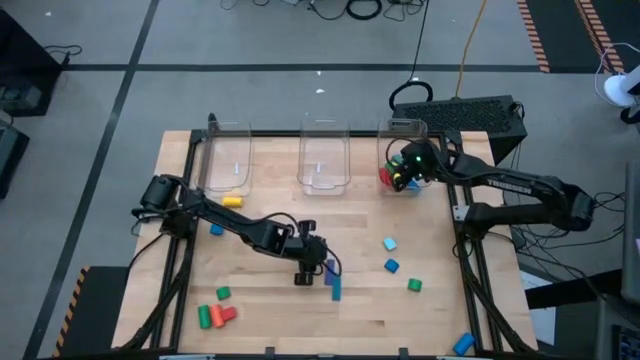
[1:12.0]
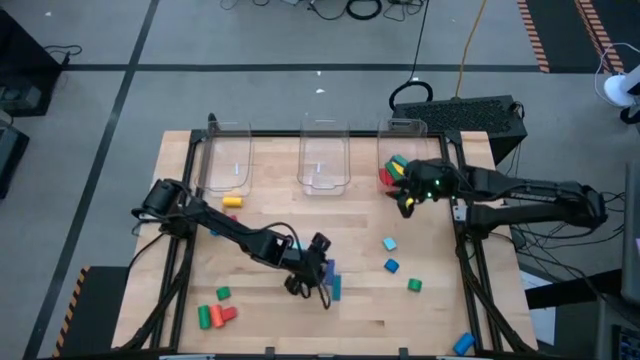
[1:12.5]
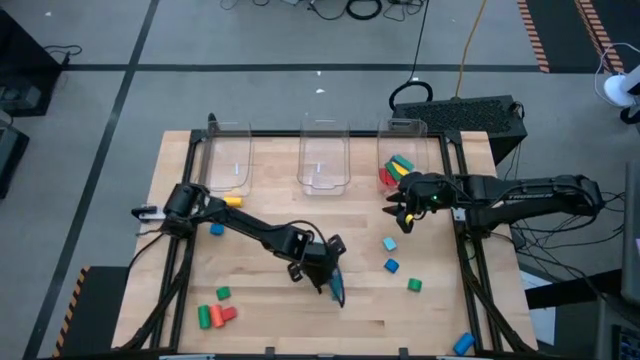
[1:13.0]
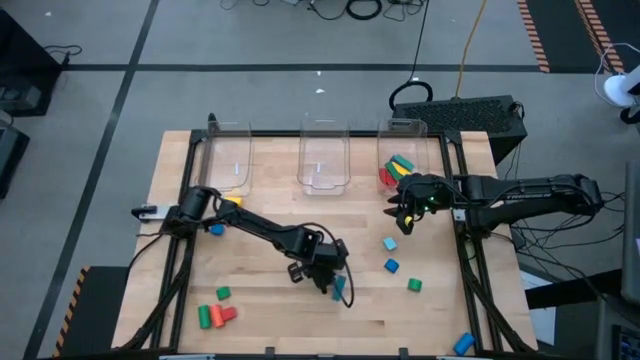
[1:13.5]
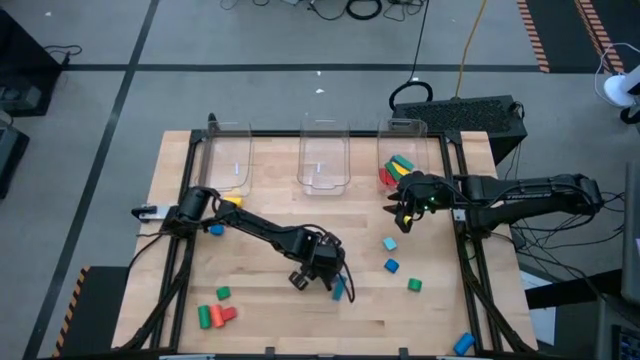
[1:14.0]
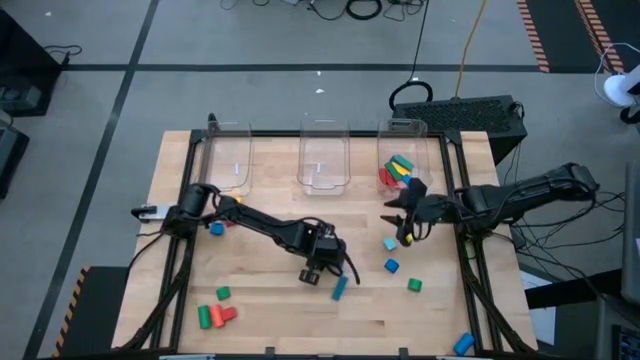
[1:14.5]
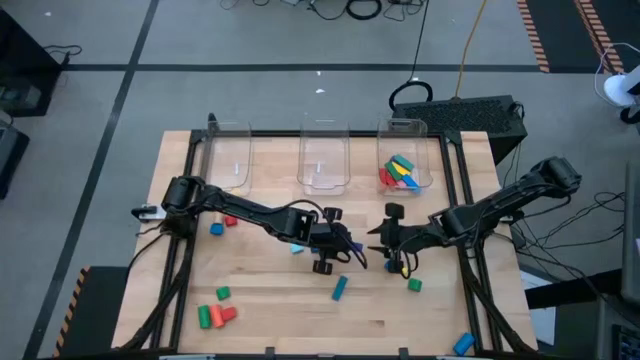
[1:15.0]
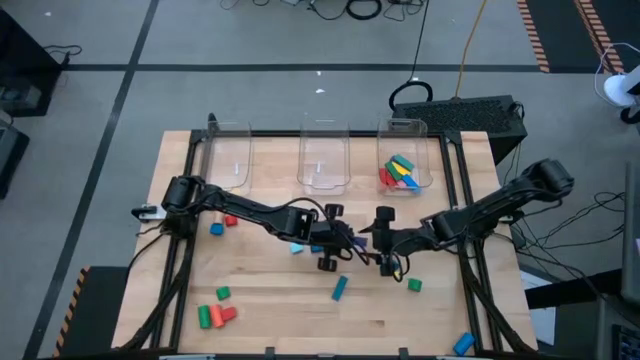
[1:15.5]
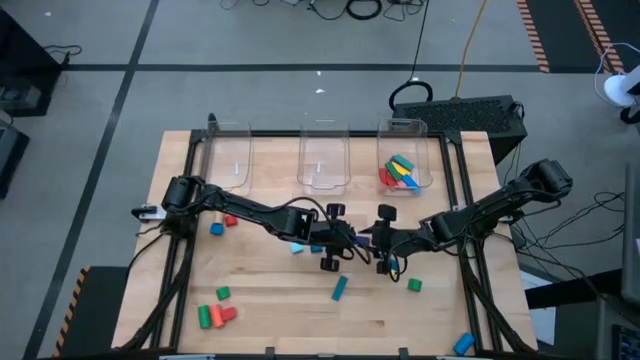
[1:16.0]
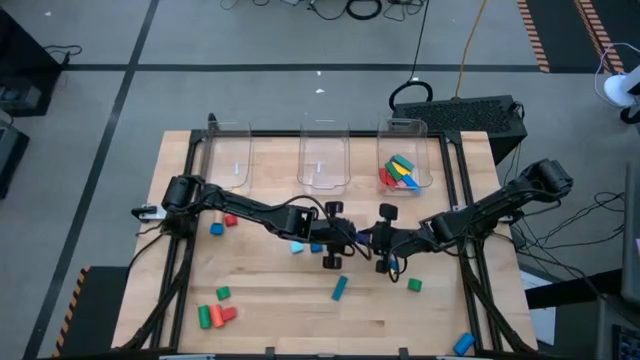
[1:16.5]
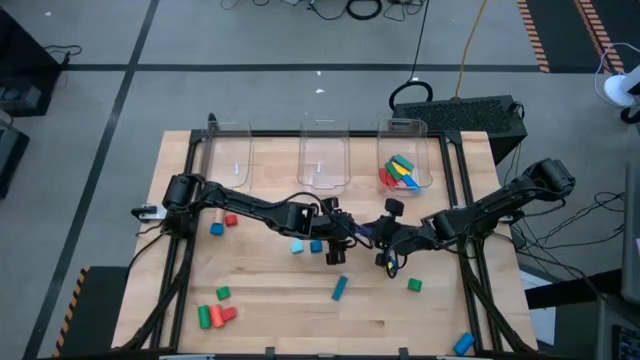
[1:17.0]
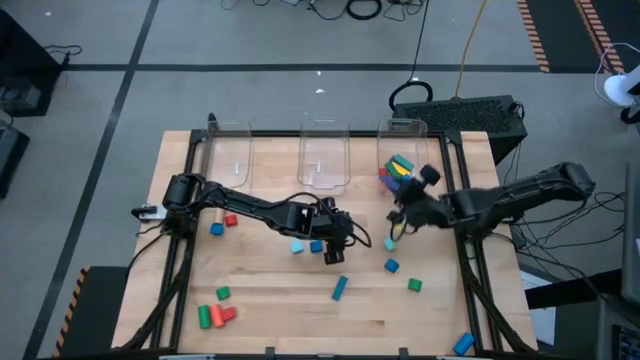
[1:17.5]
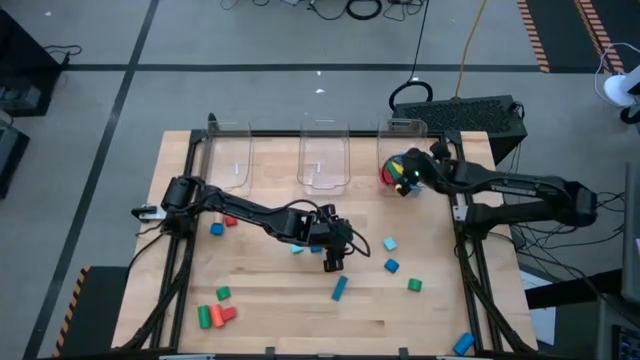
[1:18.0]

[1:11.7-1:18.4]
Task: Sort blocks by size
Put the blue rectangular block into the right transparent bin

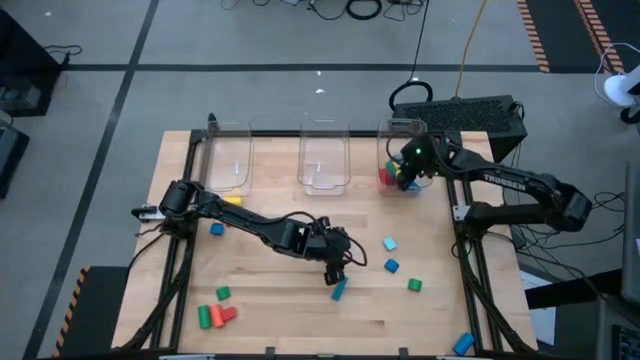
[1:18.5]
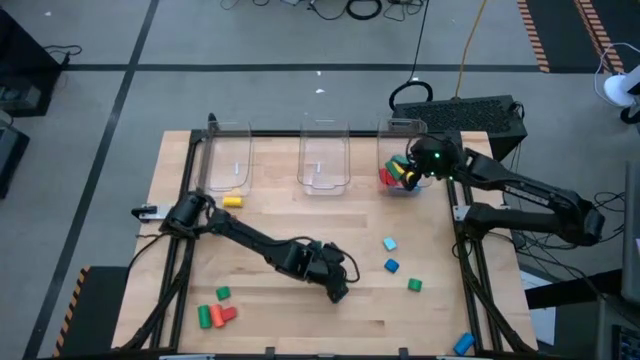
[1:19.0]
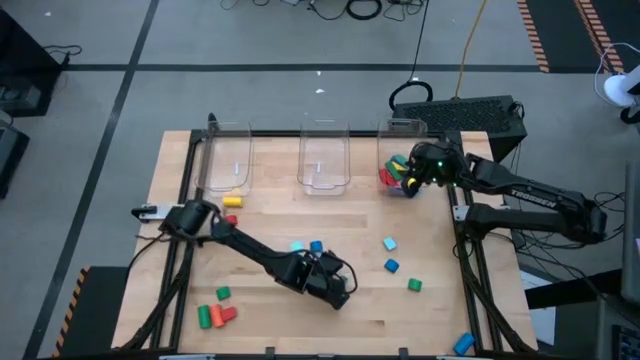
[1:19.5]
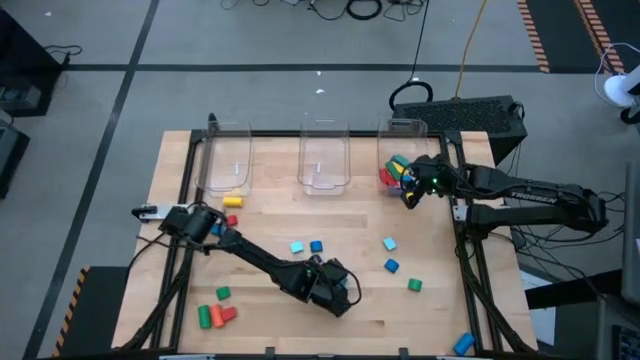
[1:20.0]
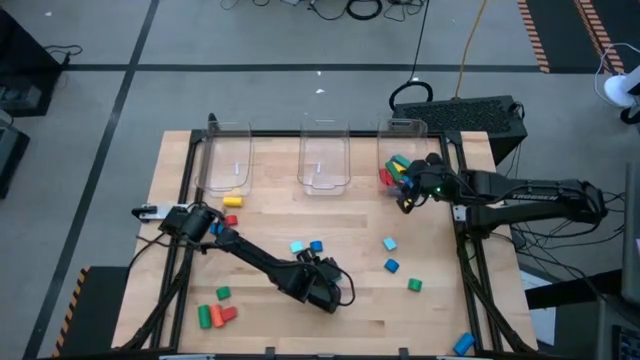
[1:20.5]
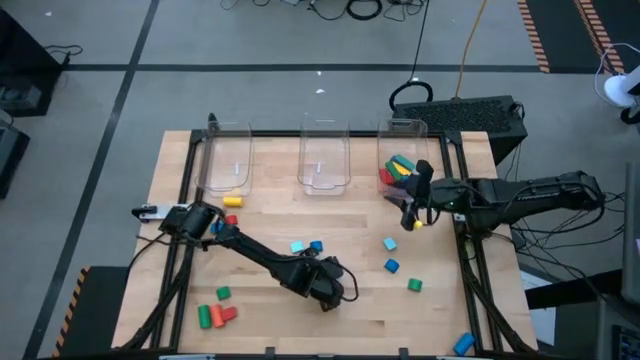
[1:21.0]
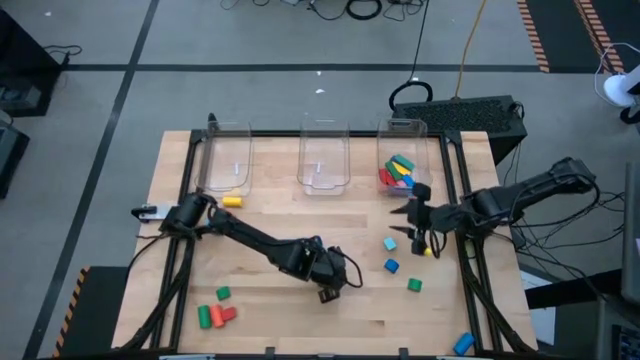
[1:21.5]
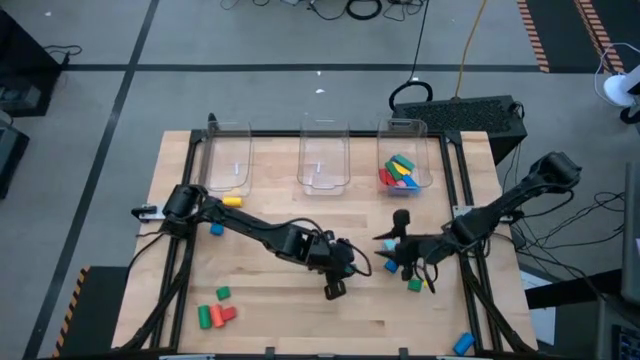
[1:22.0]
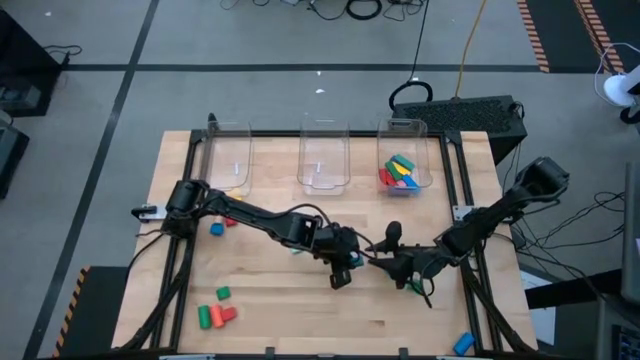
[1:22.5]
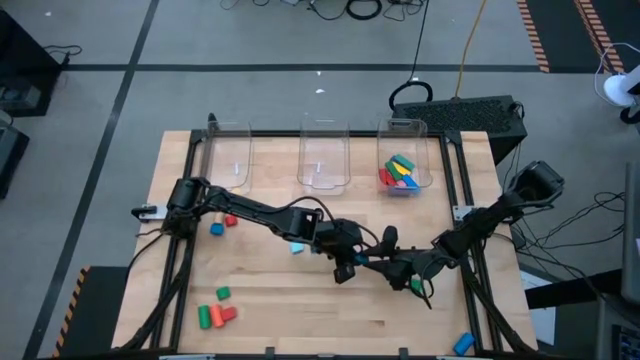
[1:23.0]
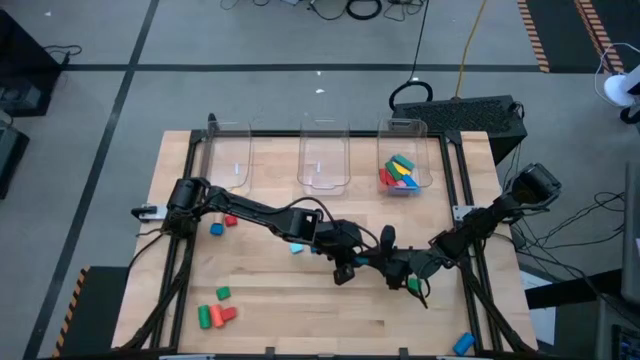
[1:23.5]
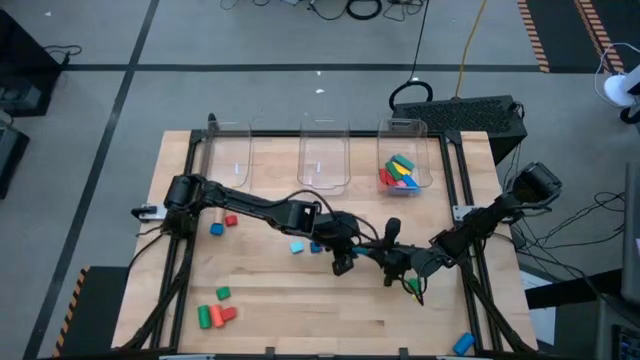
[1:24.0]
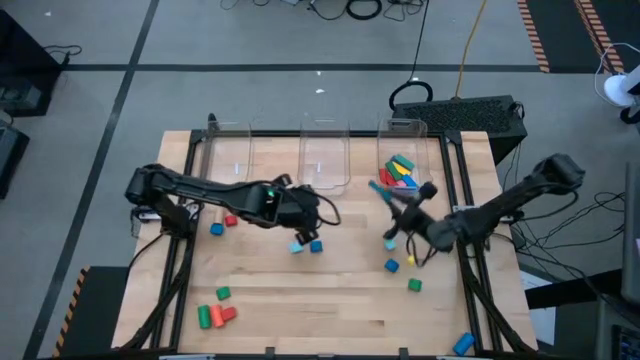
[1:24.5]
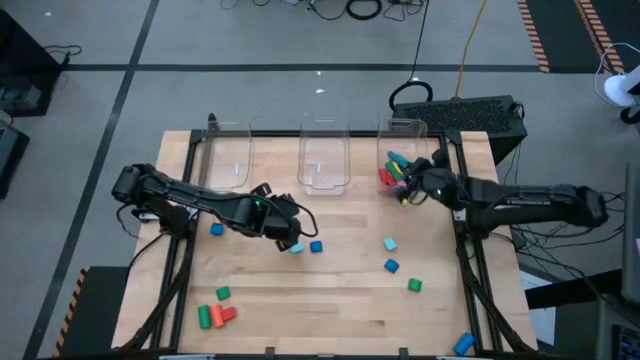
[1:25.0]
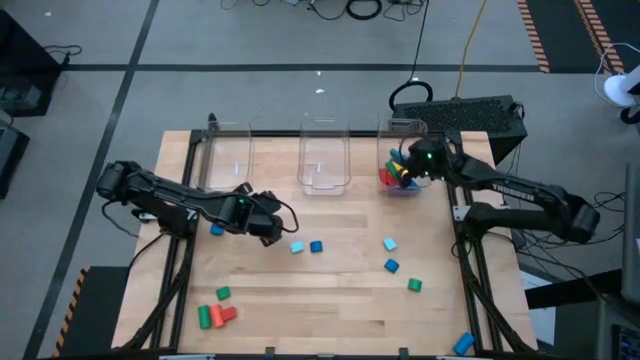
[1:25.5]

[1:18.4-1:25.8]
Put the blue rectangular block into the right transparent bin

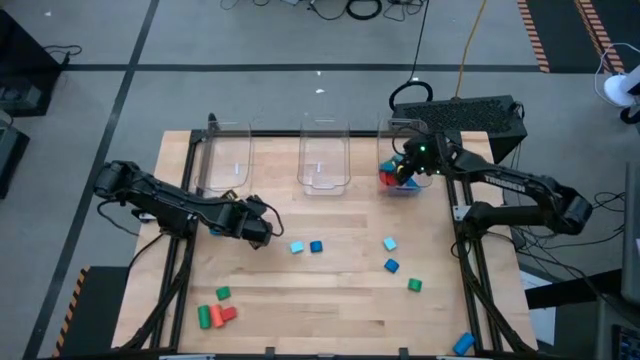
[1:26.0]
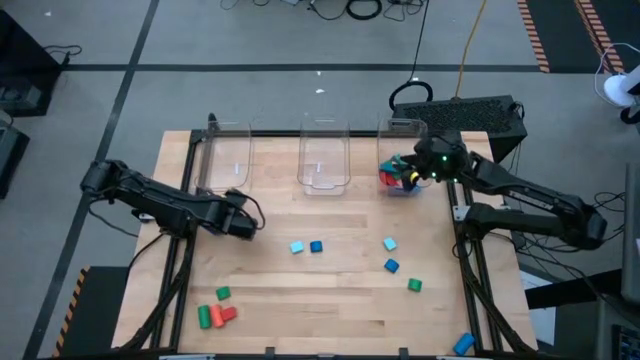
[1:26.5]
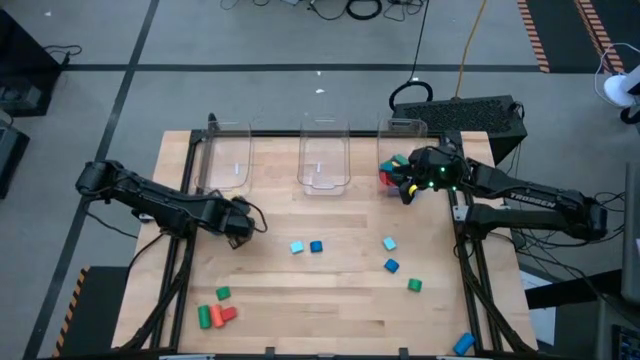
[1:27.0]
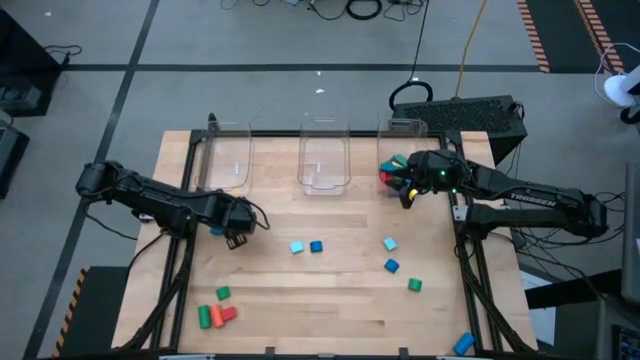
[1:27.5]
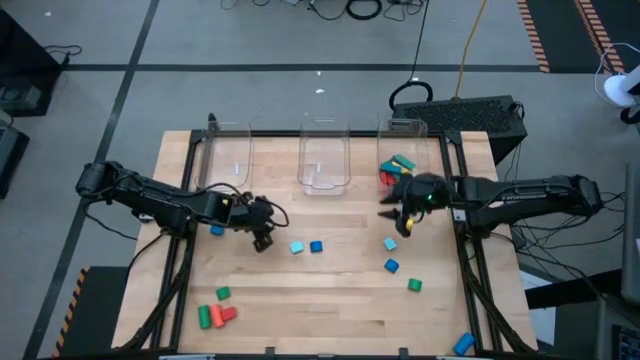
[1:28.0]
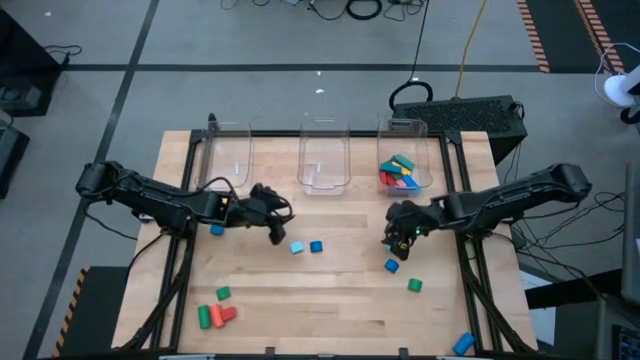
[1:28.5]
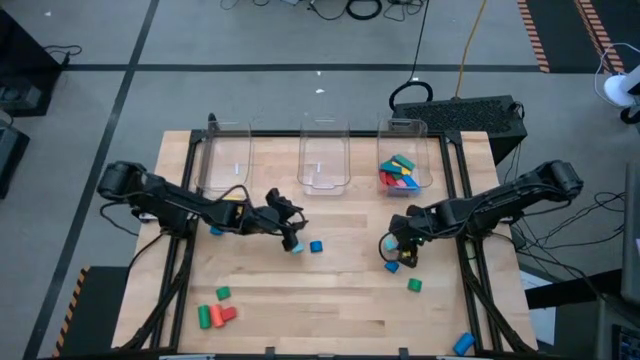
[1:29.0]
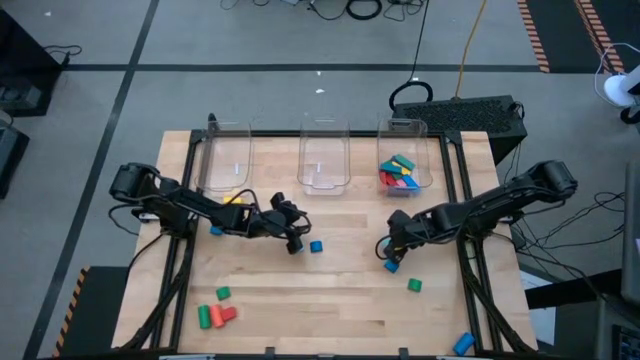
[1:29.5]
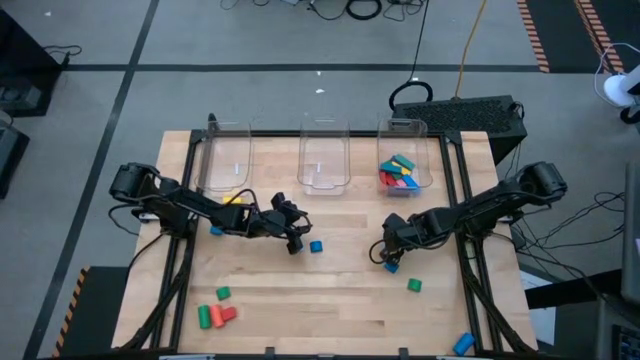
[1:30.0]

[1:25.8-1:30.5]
Put the light blue half circle block into the center transparent bin

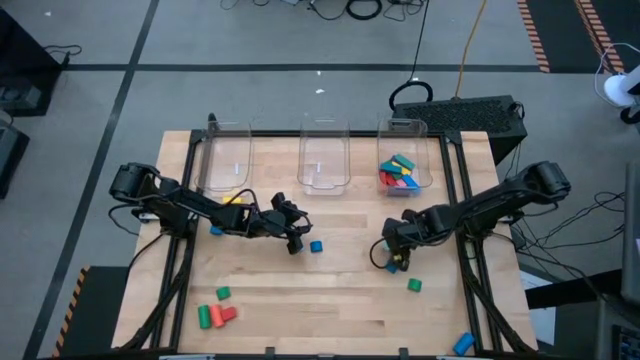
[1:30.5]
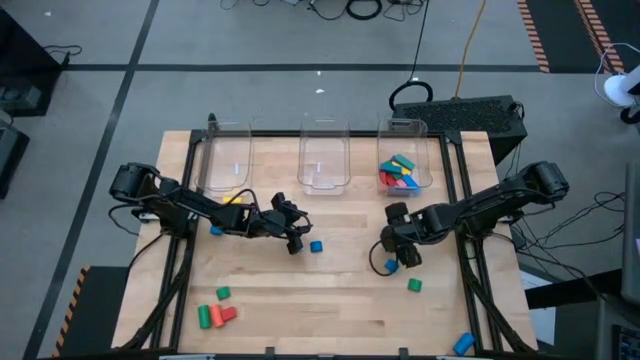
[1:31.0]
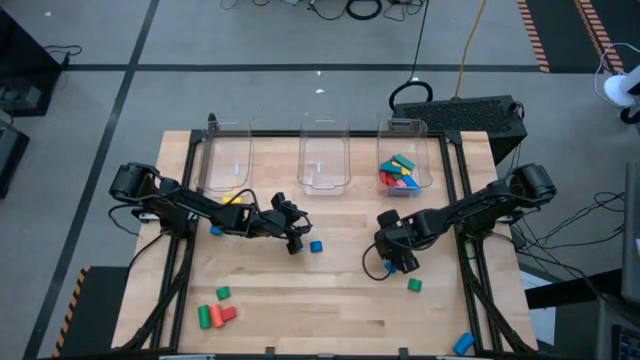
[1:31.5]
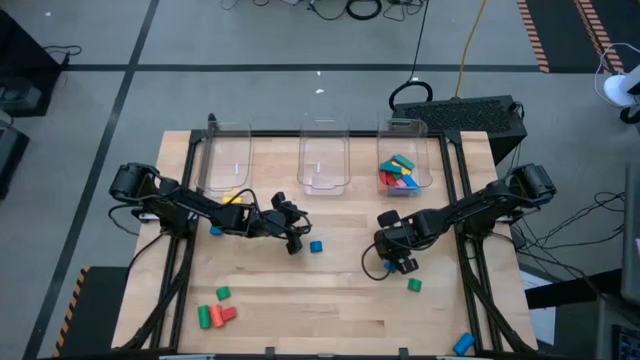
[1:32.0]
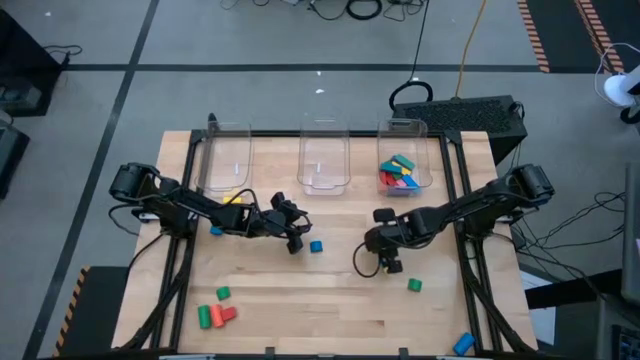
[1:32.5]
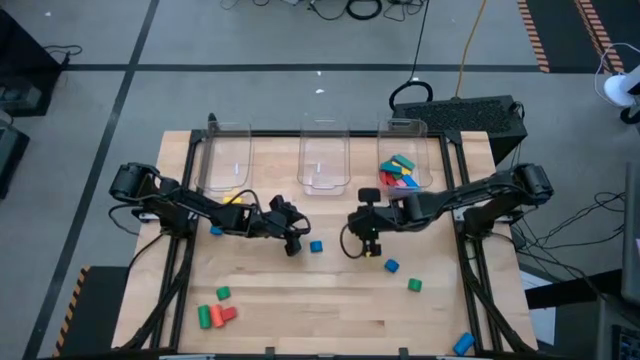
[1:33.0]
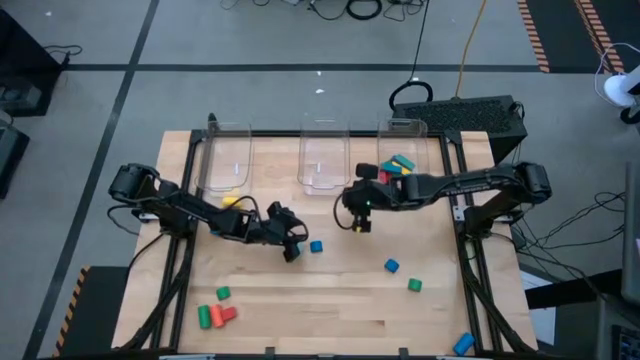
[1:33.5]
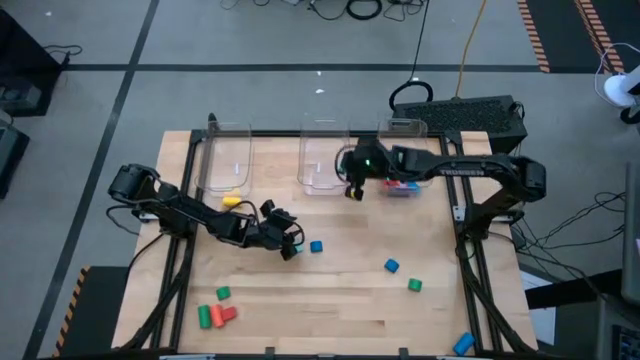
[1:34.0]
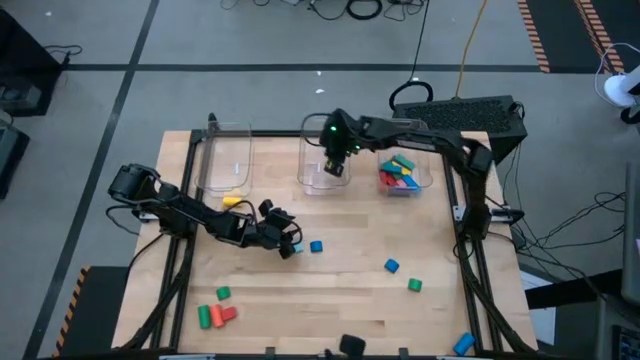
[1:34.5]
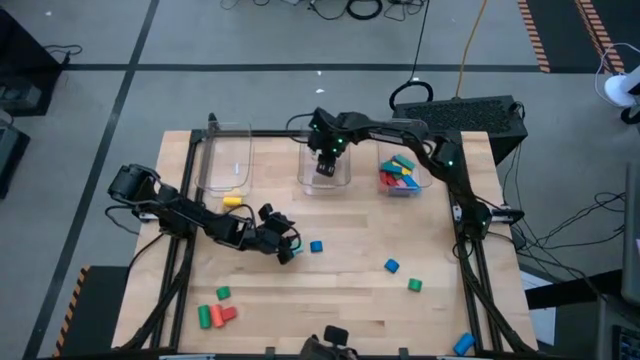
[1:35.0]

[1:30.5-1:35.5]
Put the light blue half circle block into the center transparent bin
